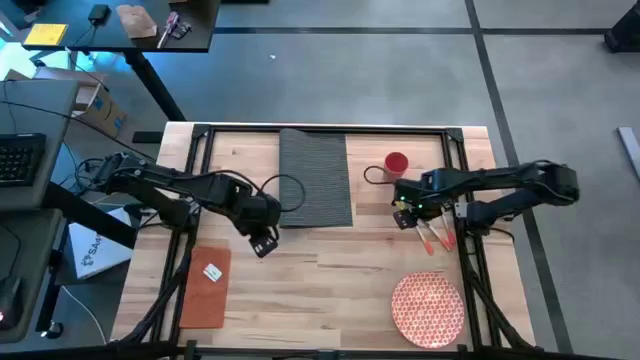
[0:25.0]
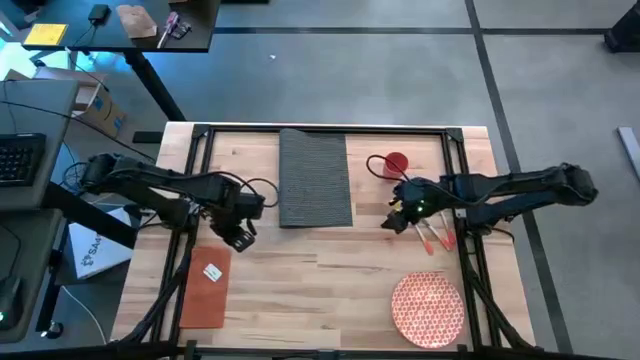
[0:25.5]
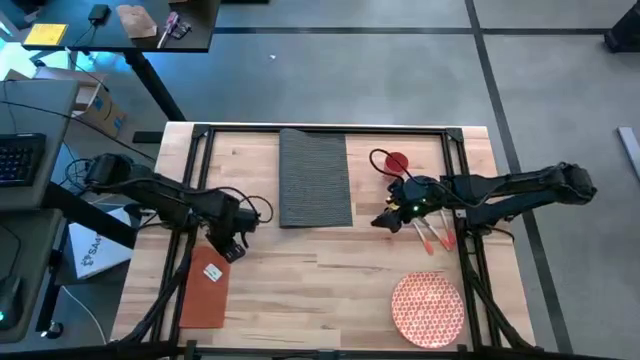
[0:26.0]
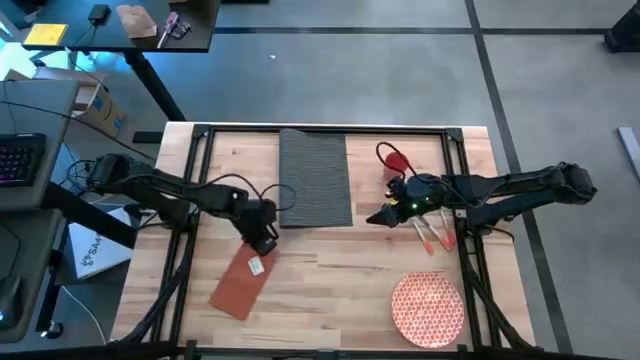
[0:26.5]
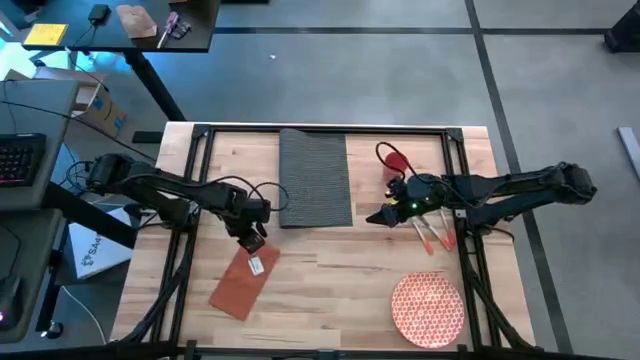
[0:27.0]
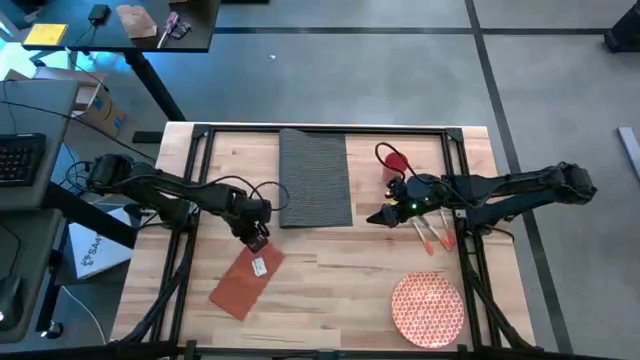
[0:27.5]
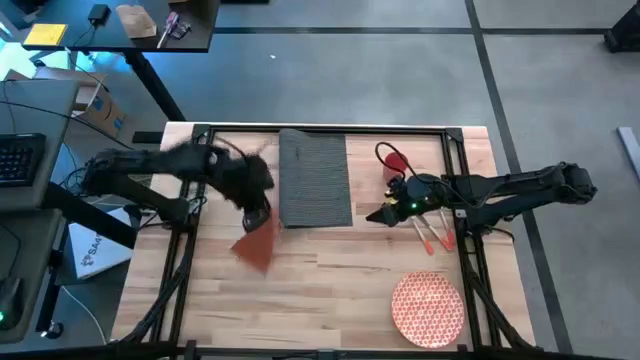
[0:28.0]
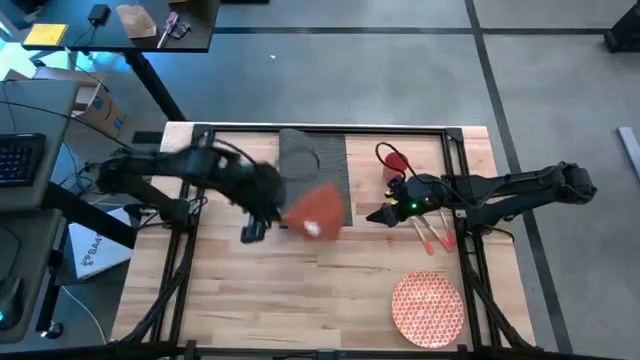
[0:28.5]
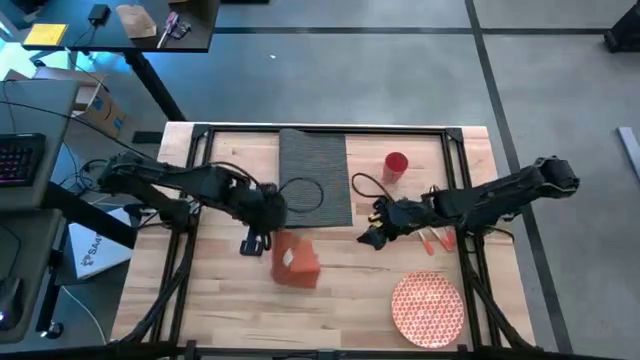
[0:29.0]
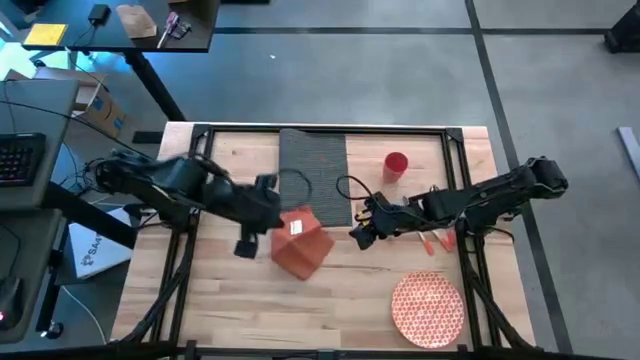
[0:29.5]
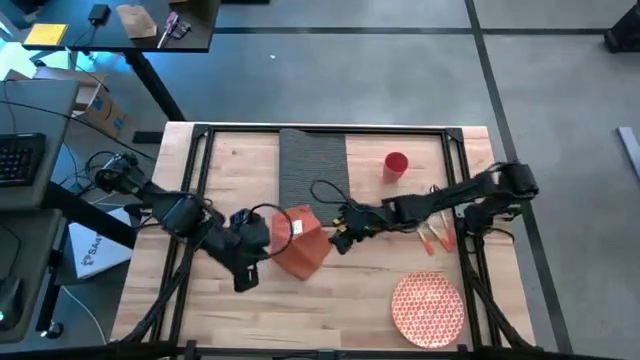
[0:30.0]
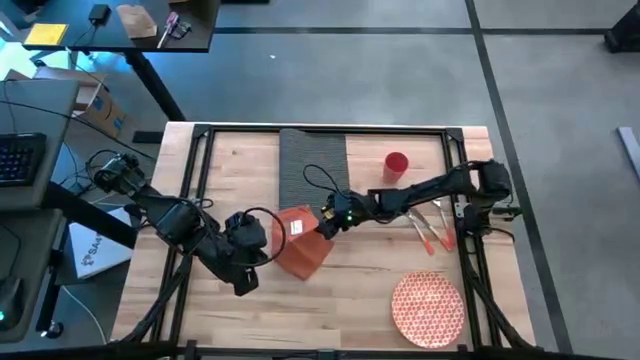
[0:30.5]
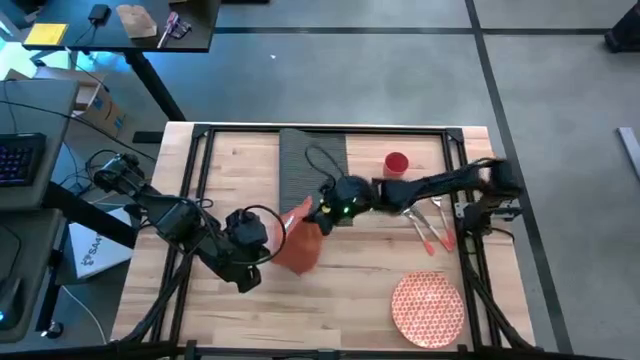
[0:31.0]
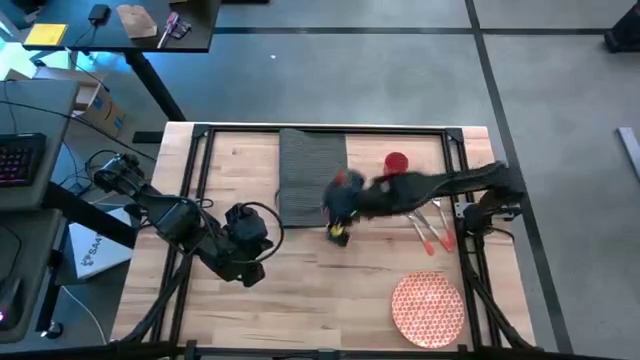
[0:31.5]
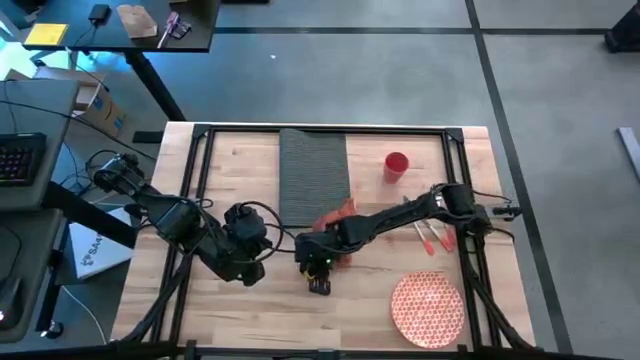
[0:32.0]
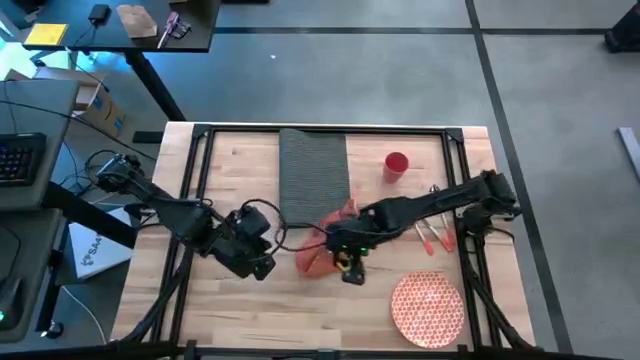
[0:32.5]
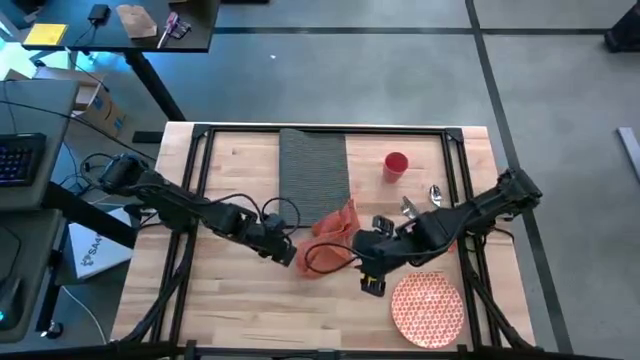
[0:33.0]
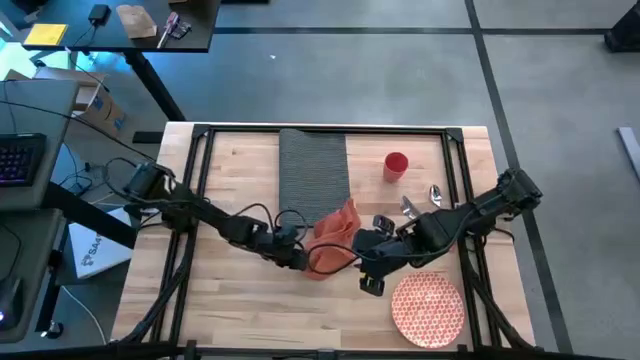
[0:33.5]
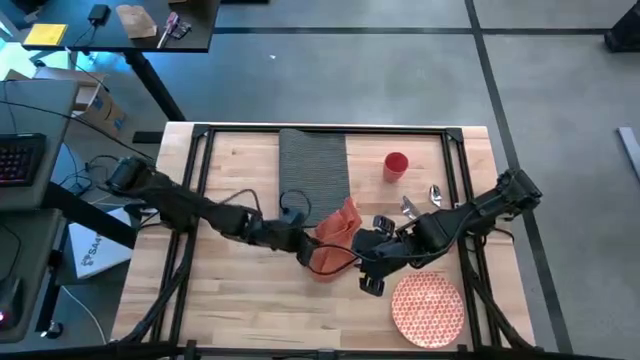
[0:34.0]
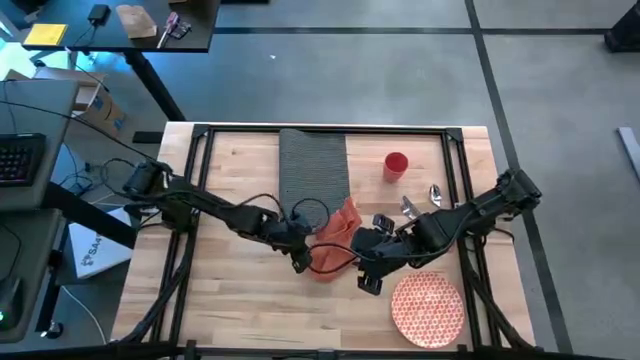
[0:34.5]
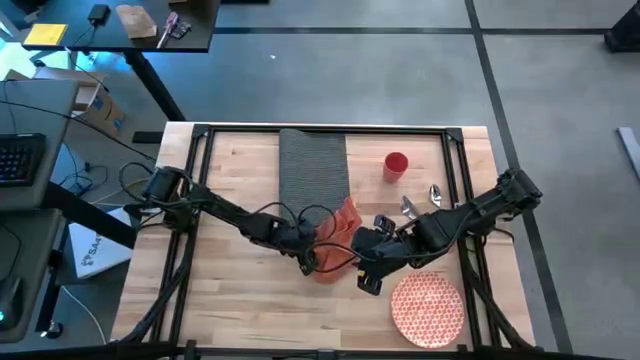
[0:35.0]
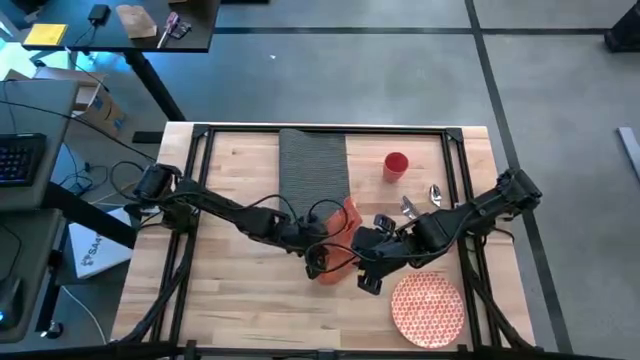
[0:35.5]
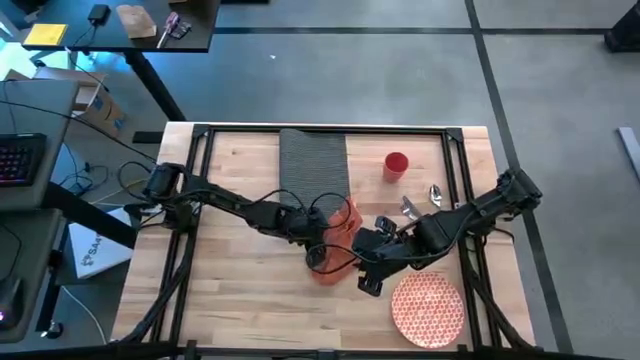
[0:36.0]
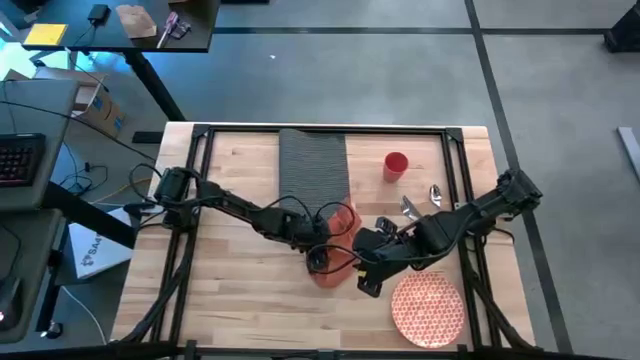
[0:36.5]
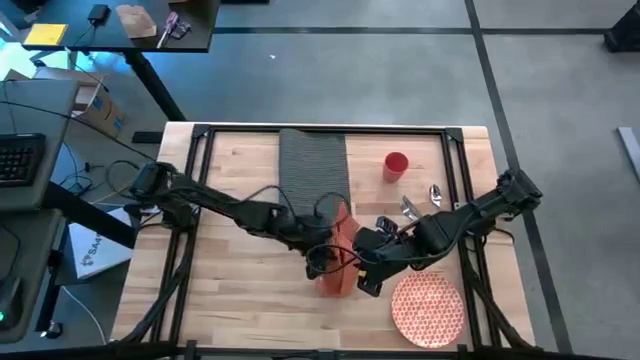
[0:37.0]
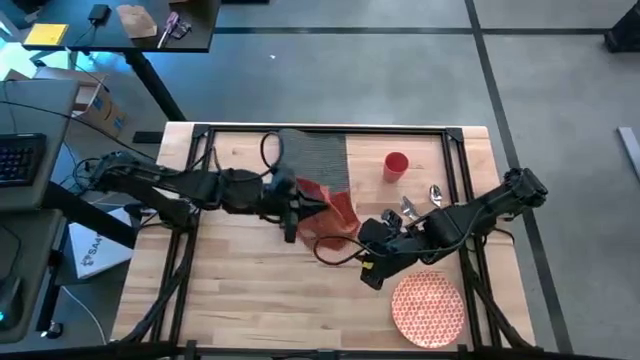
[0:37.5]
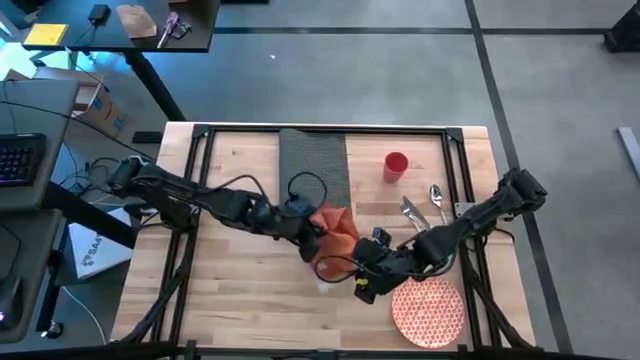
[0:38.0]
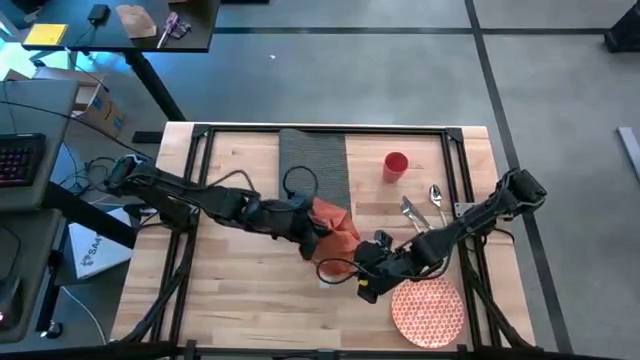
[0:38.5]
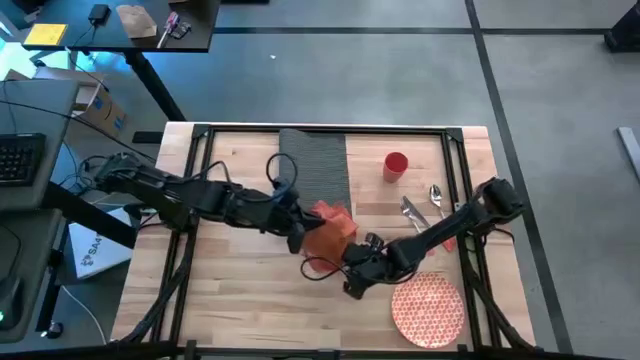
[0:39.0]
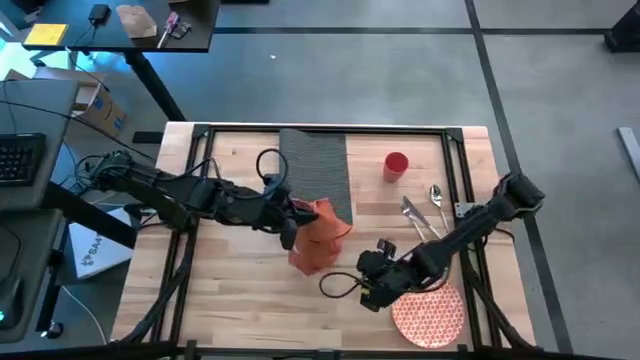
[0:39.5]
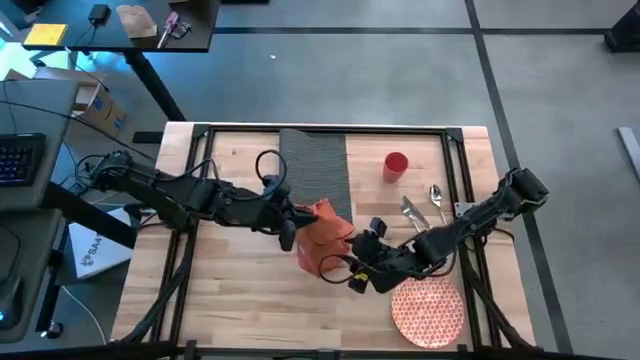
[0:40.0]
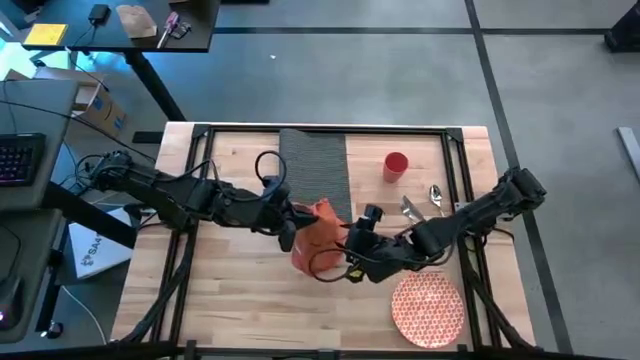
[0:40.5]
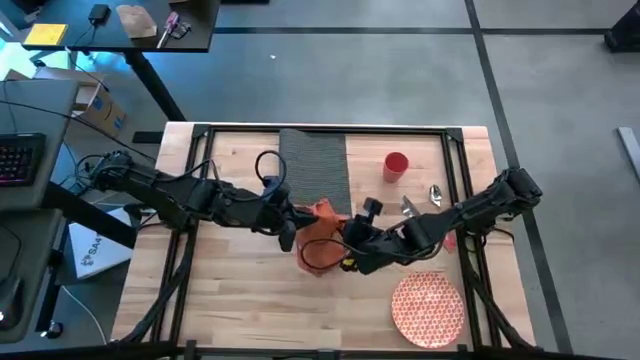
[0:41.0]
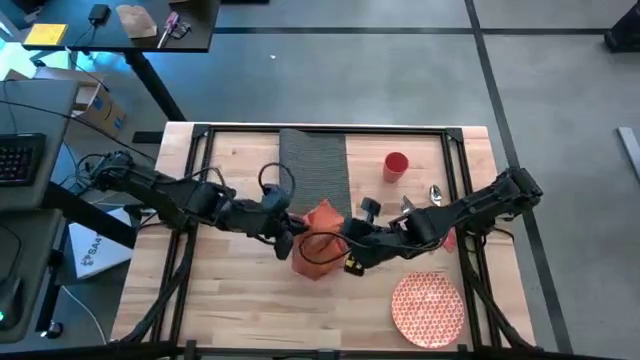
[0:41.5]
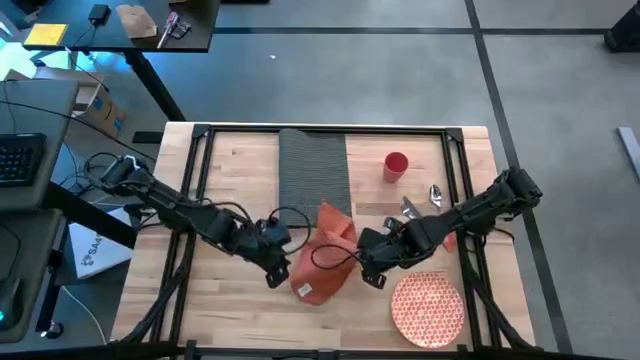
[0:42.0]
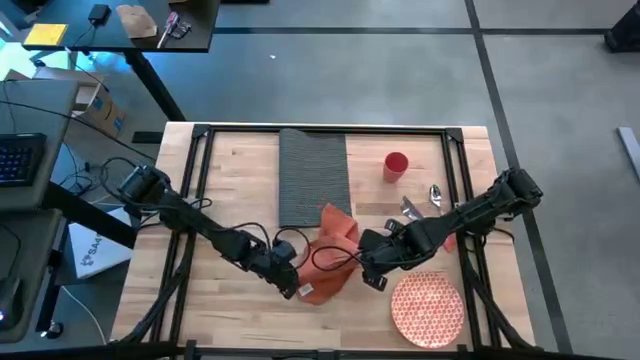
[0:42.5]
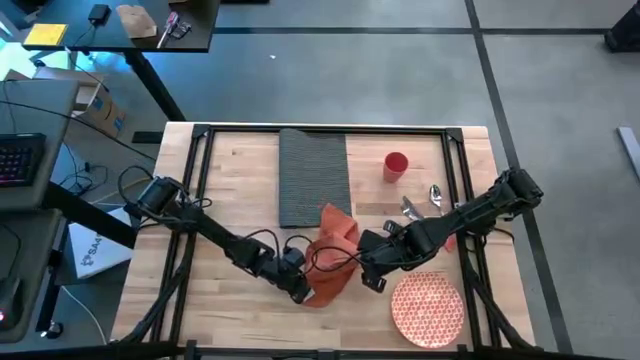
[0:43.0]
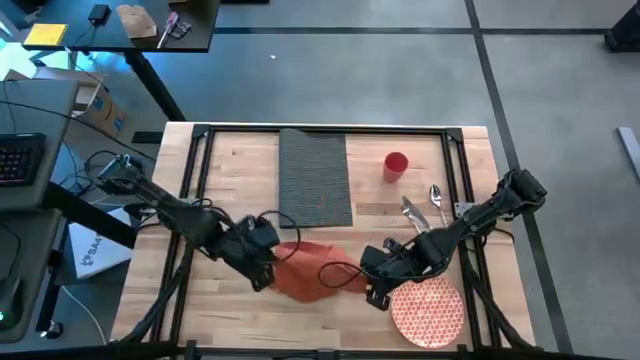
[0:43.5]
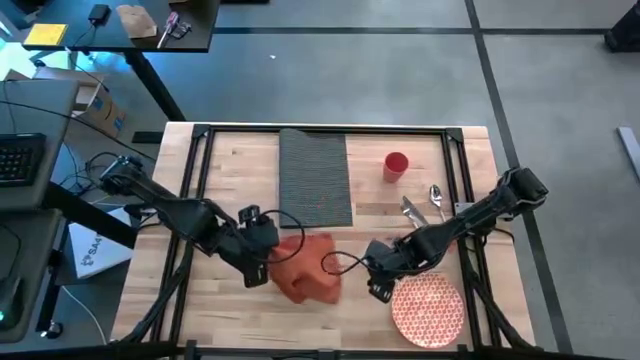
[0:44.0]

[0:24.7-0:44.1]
Task: Set table place
Move the orange napkin to the center of the table

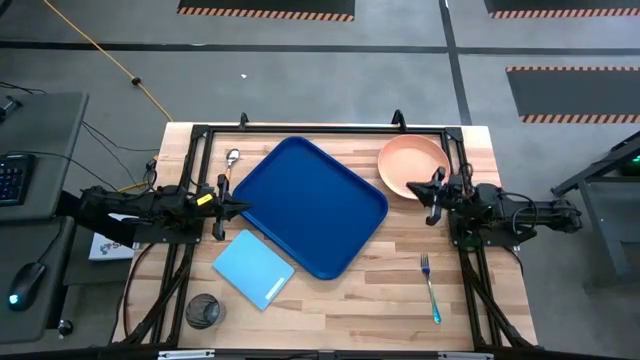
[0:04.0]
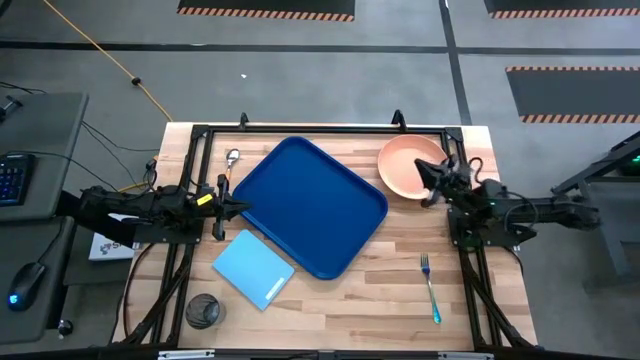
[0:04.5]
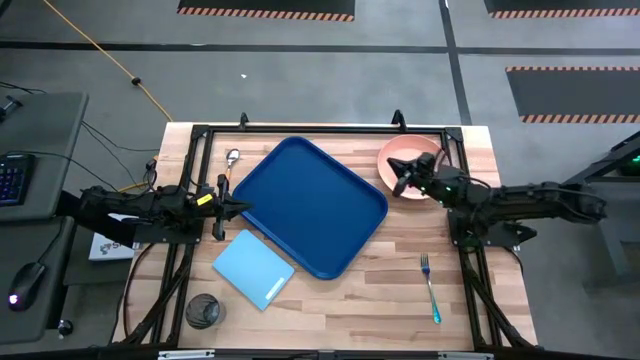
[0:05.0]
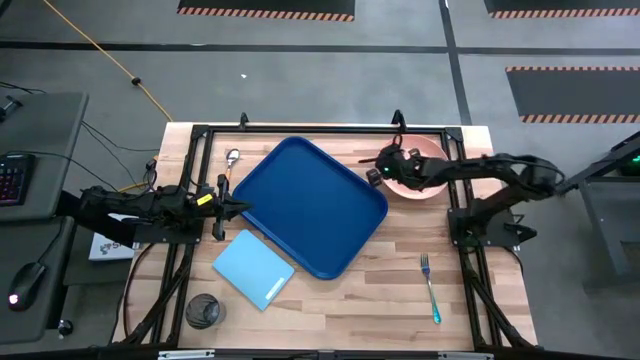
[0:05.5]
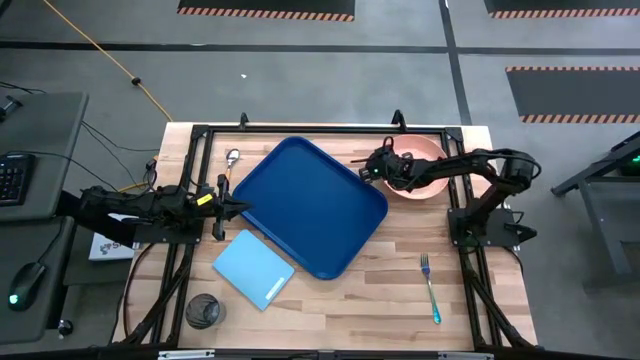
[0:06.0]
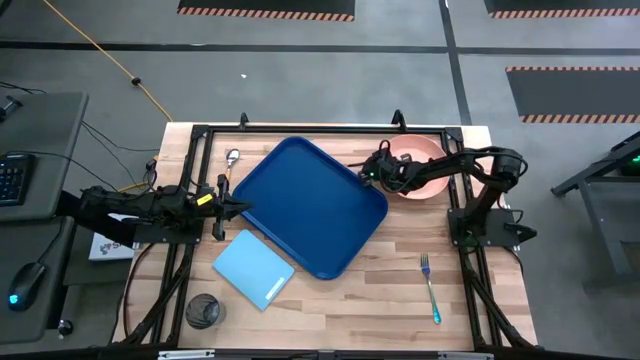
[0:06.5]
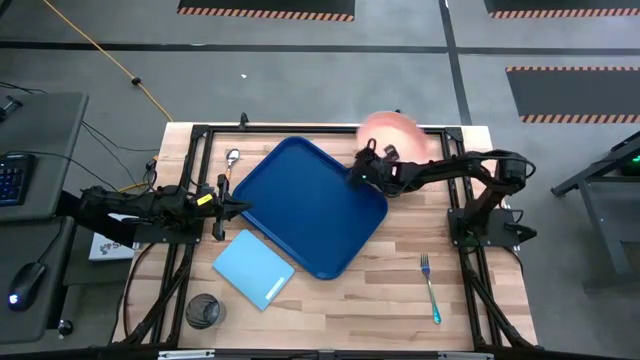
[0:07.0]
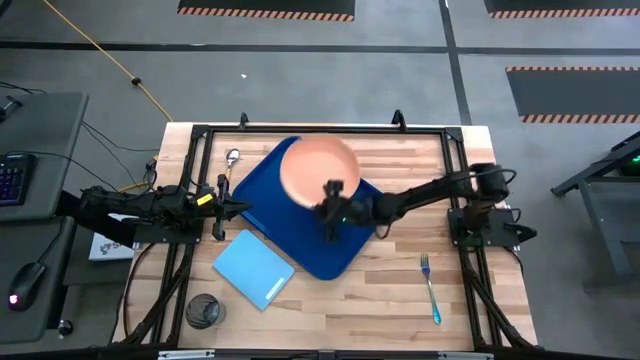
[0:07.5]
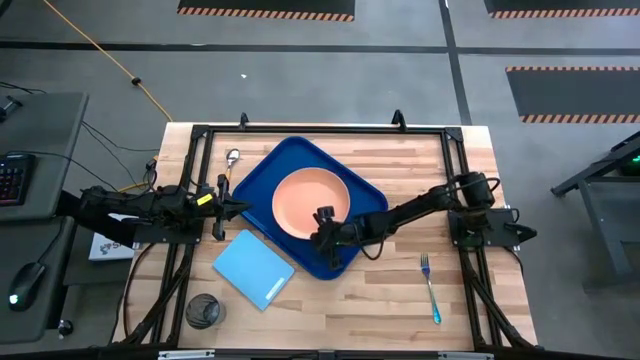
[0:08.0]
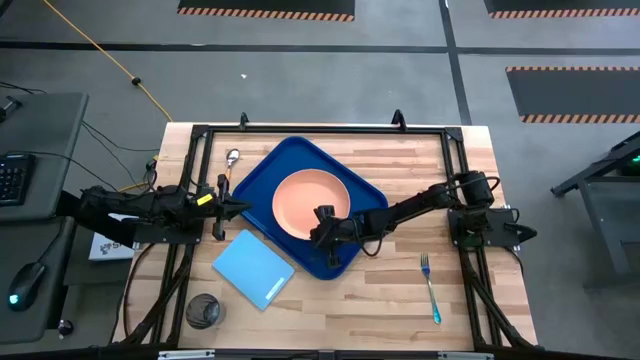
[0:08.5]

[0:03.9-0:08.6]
Task: Pick and place plate/cup/fork/spoon on tray
Put the light orange plate on the blue serving tray
